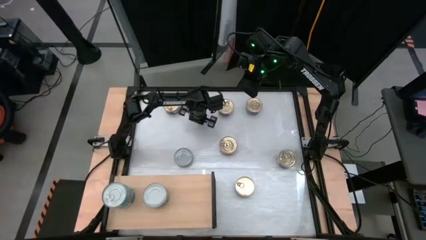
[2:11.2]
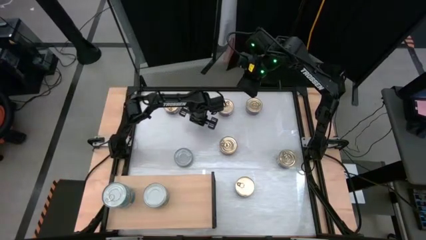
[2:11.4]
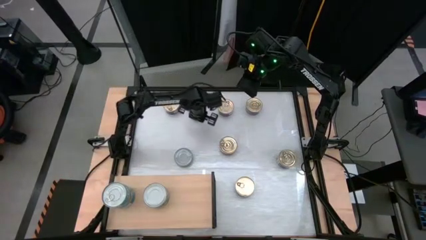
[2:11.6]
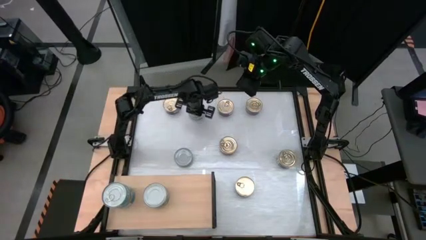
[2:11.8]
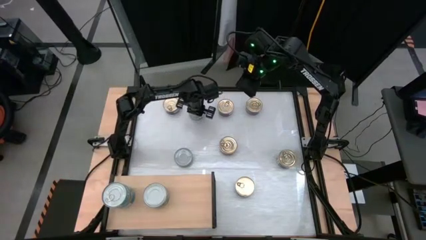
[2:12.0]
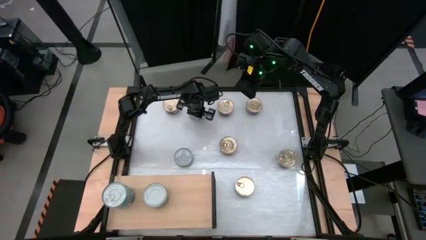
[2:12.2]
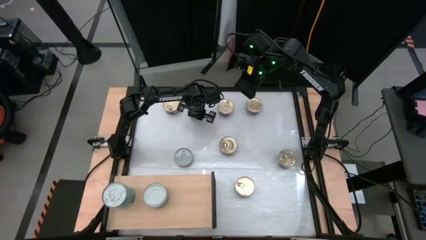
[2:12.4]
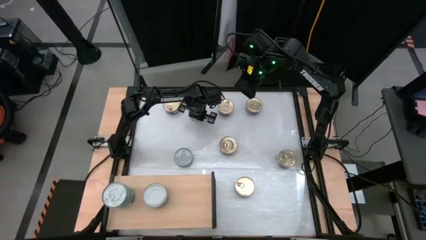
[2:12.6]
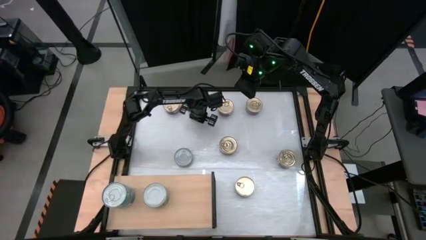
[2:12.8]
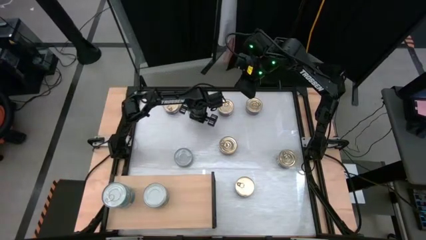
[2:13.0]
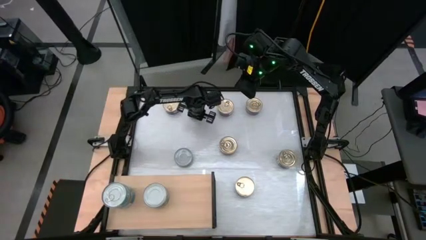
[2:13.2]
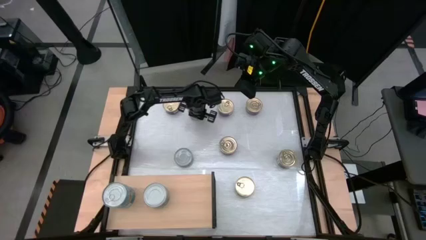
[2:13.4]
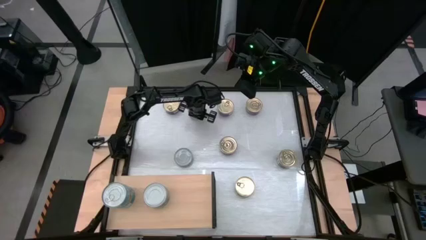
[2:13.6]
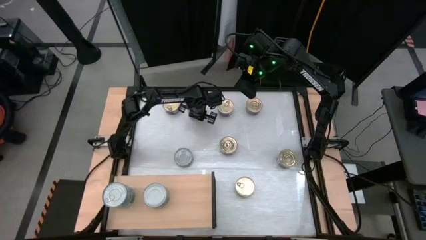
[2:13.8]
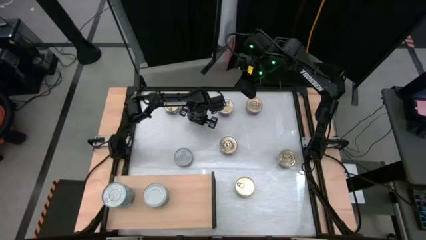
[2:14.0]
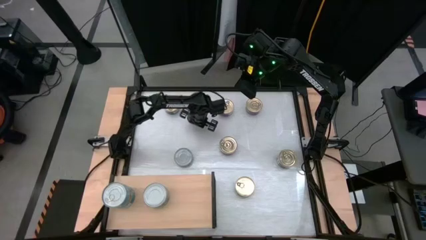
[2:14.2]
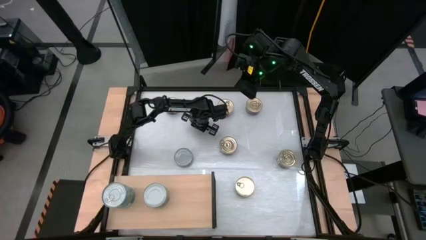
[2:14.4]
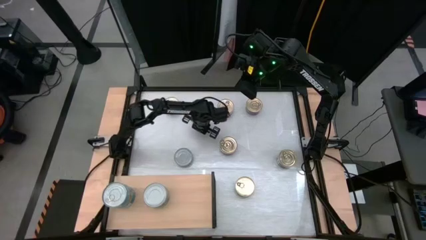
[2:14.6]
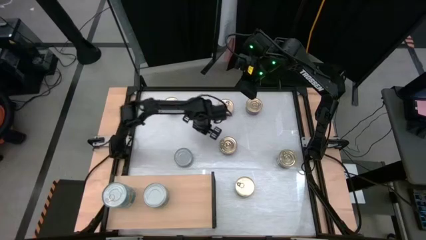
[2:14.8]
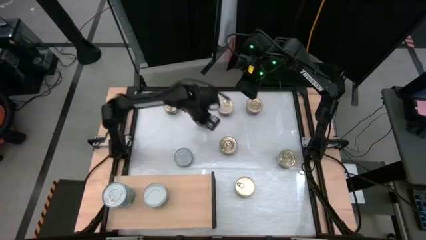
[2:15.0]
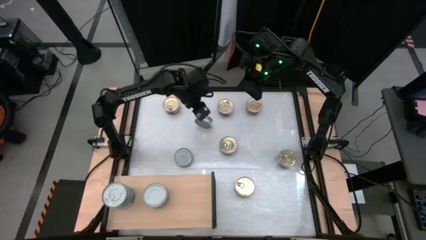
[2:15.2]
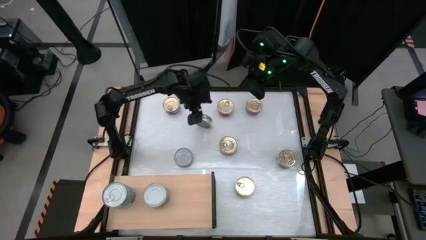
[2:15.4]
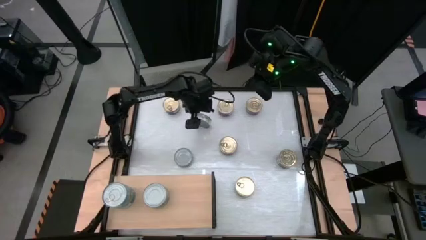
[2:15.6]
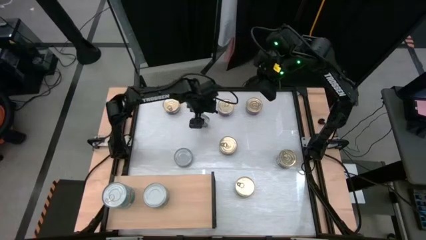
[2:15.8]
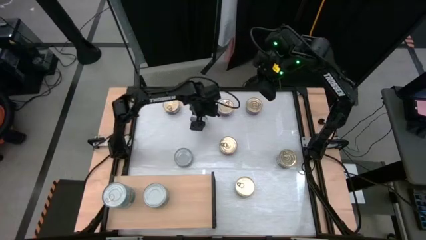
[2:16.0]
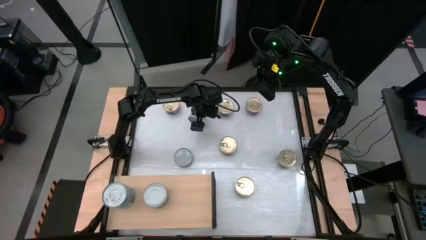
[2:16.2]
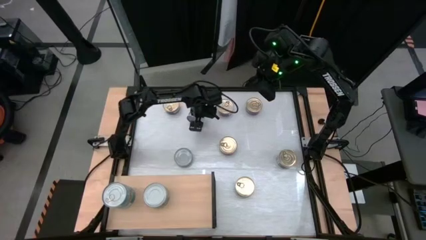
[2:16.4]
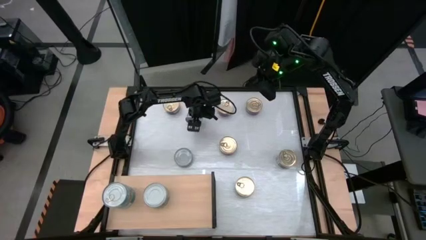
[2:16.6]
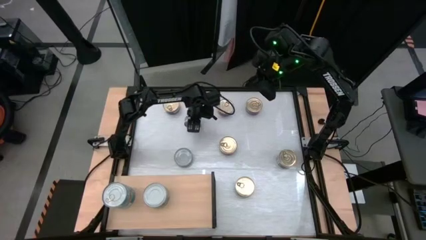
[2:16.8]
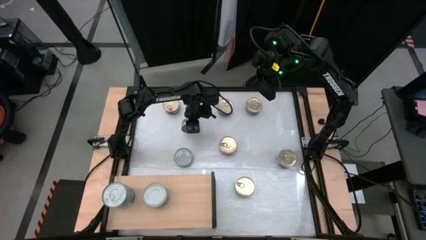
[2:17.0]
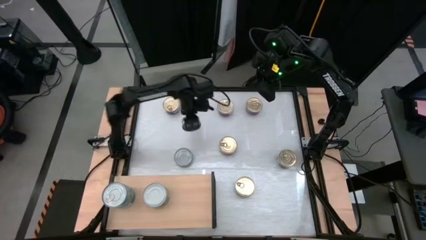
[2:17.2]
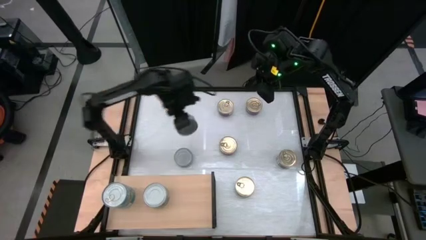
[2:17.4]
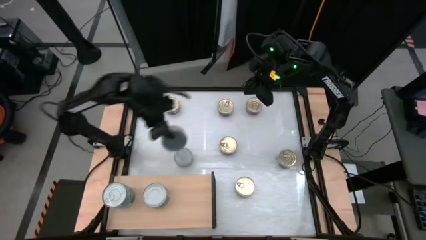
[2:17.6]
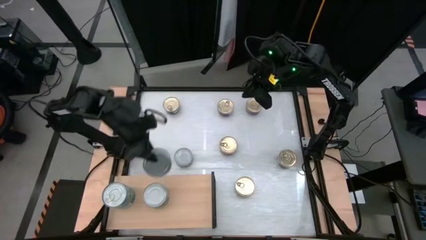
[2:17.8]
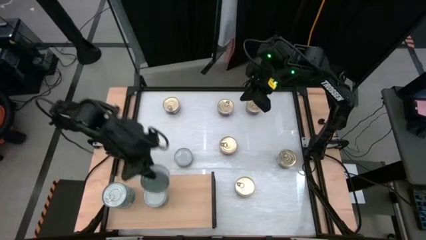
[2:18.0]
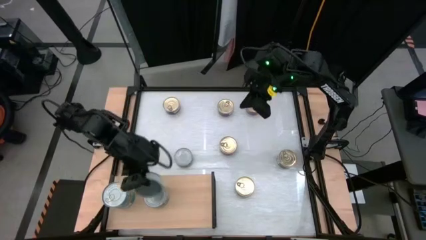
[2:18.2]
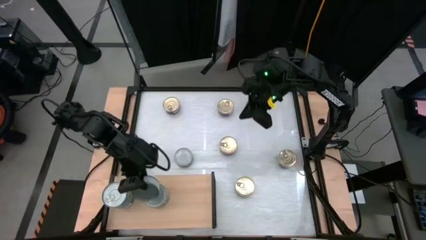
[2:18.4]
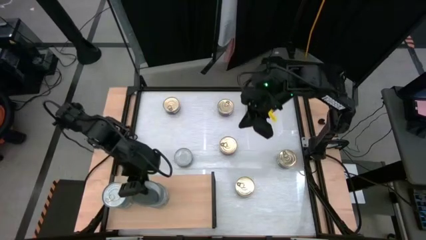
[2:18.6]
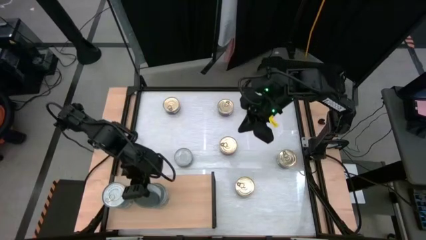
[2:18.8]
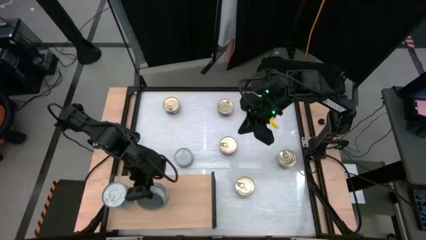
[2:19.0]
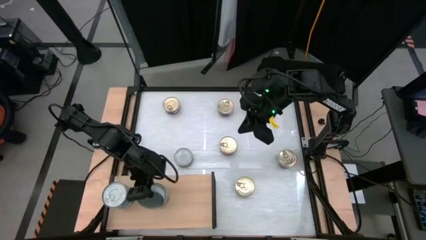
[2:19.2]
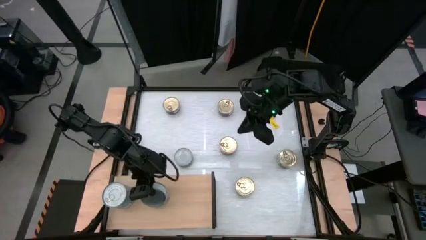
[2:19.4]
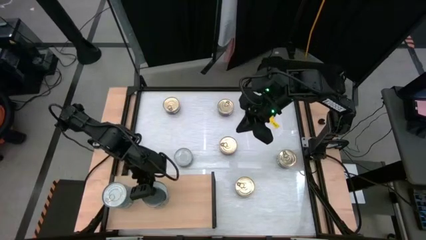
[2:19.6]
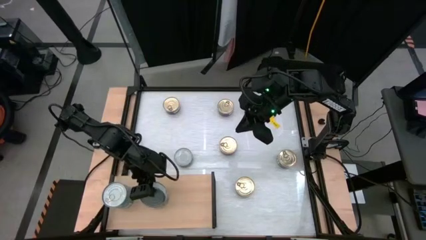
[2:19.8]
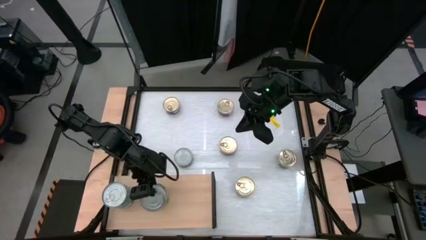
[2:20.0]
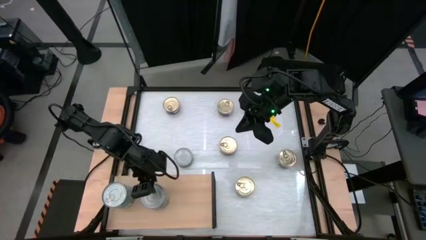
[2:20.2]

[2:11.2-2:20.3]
Task: Stack canned seafood by type on shelf
Stack the green tuna can on top of the green tuna can on the shelf

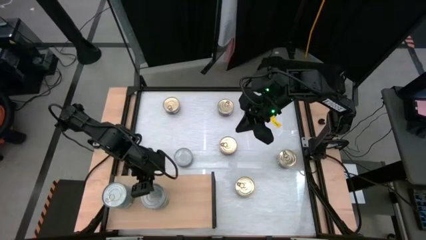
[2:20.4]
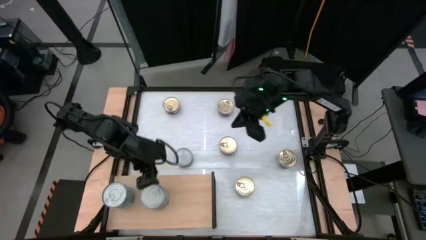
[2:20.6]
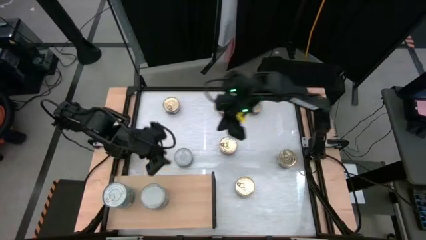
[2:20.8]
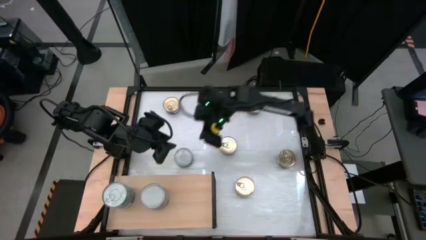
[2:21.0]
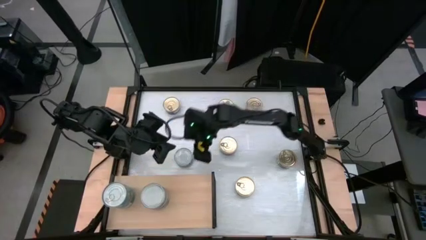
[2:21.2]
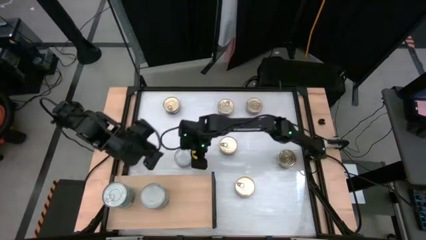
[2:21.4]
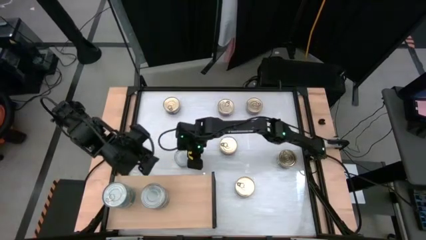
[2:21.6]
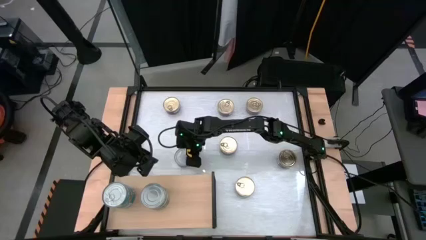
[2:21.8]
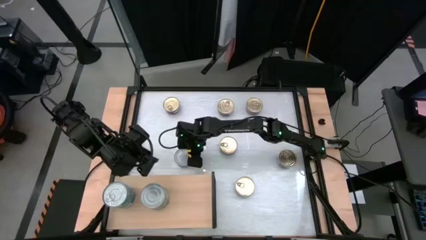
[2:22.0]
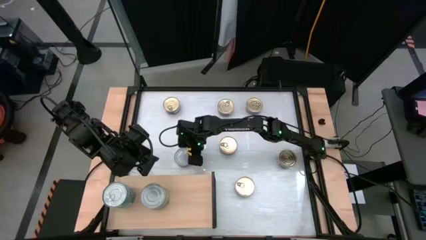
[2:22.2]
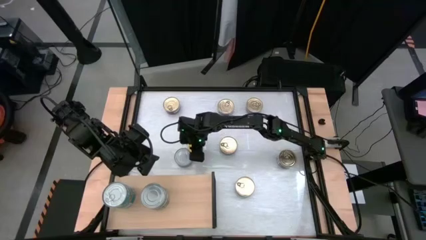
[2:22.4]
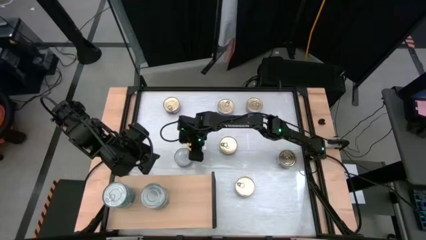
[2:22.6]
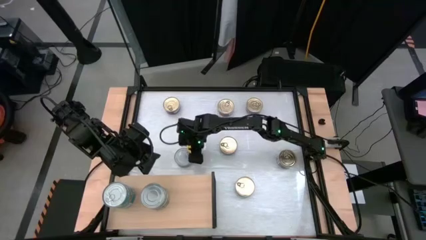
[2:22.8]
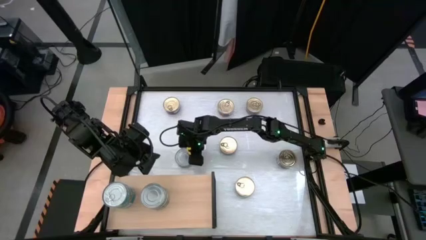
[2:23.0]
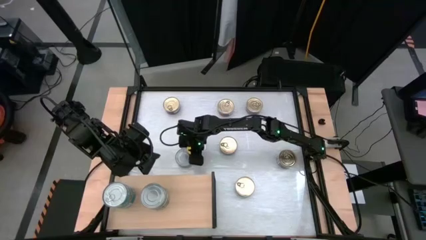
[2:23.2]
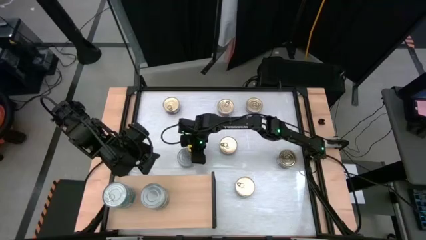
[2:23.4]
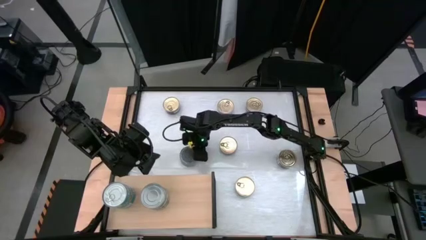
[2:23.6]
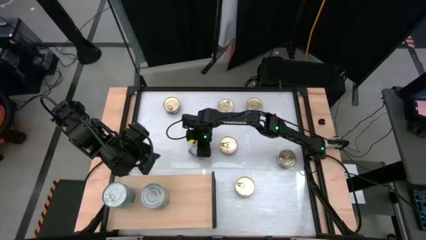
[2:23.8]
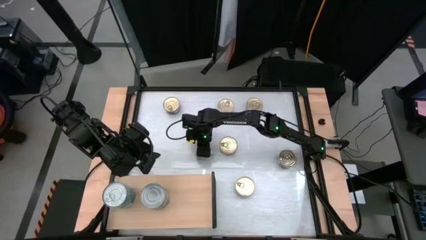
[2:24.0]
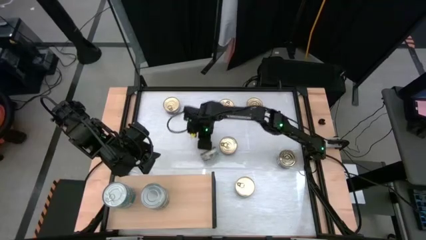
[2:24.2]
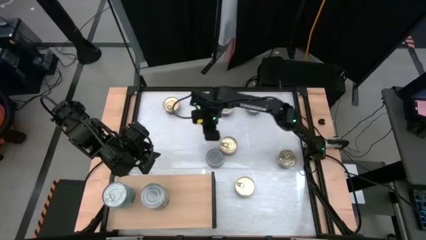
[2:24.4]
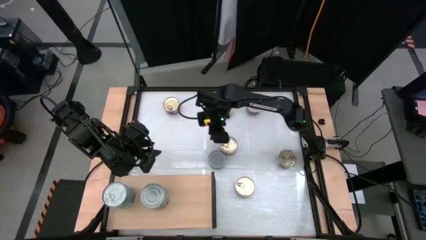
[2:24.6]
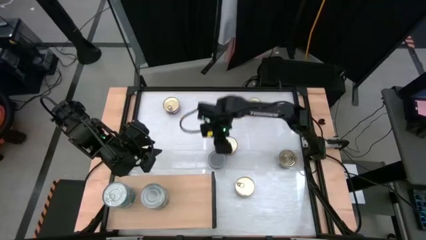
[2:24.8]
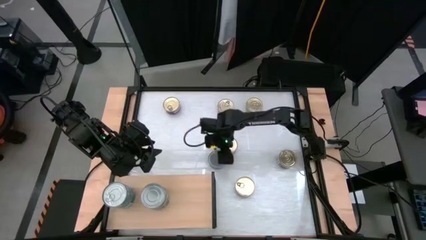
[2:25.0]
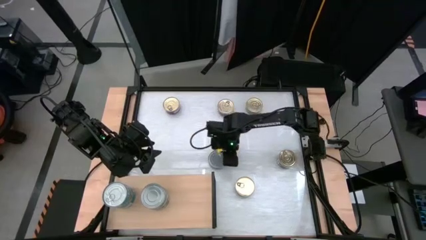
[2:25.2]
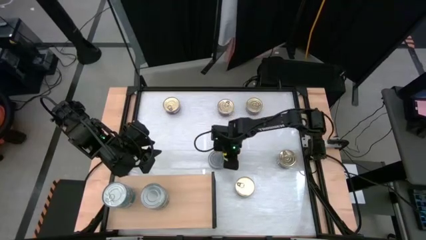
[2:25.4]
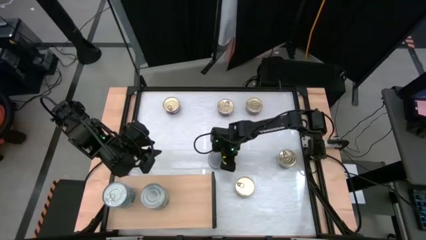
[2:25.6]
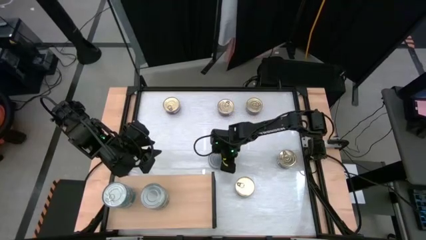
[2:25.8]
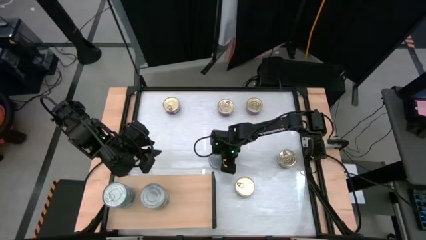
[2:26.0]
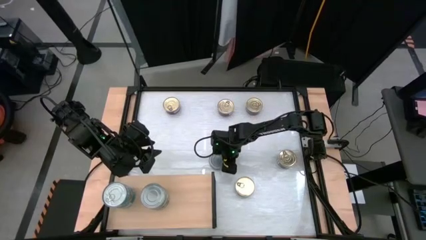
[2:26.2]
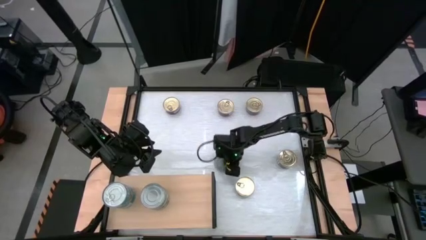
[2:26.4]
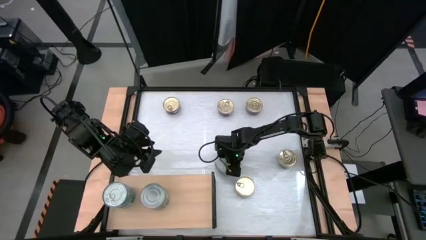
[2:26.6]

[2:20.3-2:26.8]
Stack the green tuna can on top of the green tuna can on the shelf
